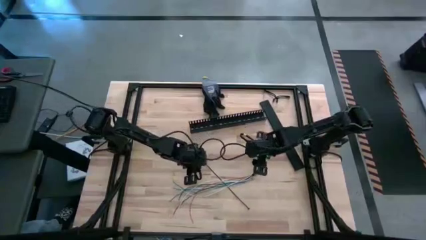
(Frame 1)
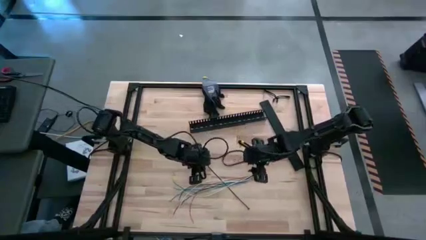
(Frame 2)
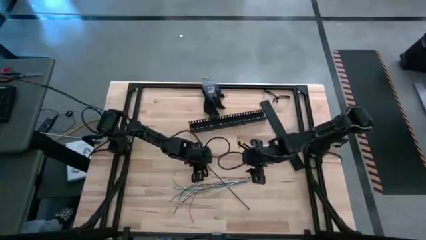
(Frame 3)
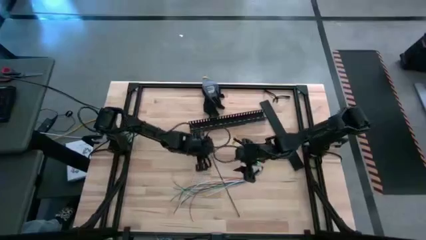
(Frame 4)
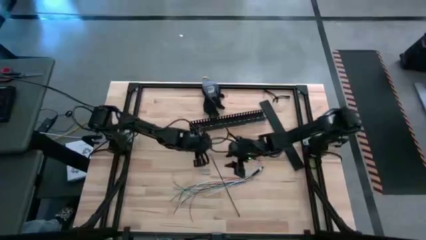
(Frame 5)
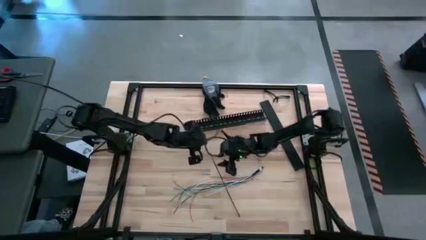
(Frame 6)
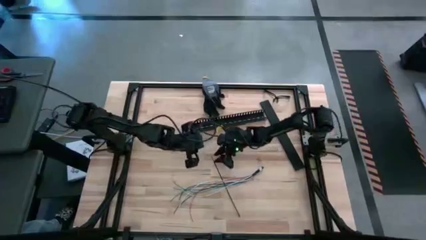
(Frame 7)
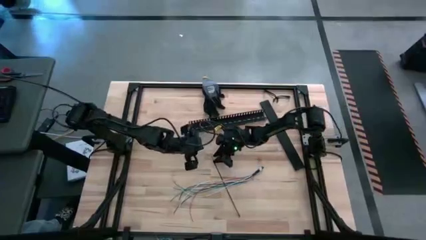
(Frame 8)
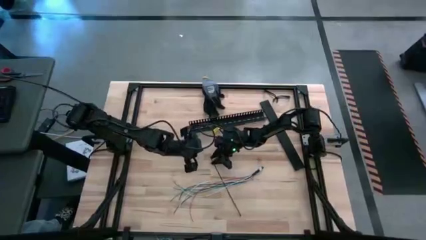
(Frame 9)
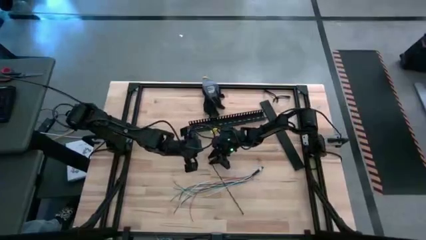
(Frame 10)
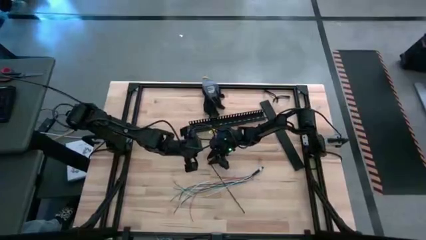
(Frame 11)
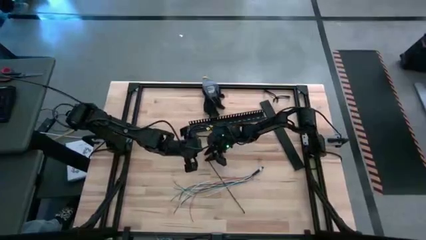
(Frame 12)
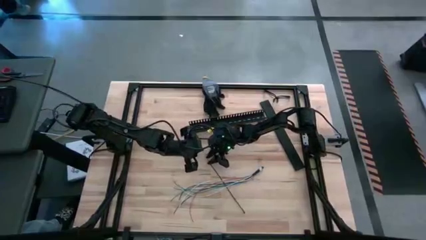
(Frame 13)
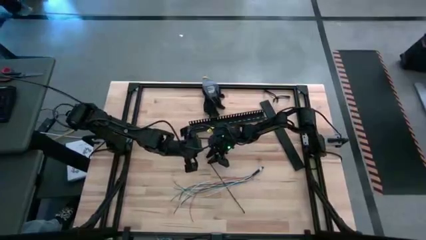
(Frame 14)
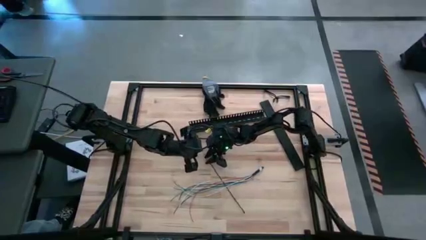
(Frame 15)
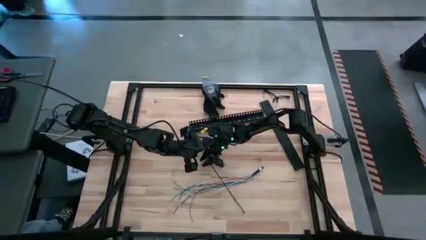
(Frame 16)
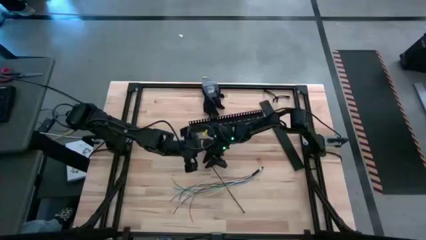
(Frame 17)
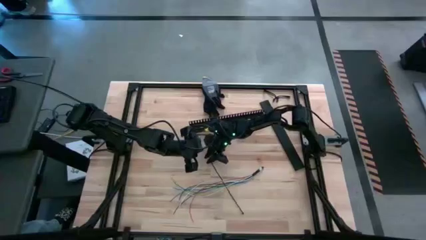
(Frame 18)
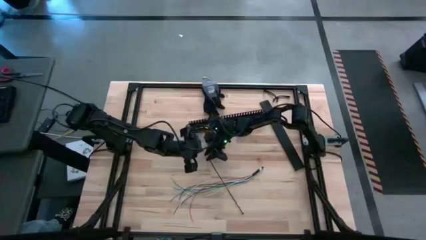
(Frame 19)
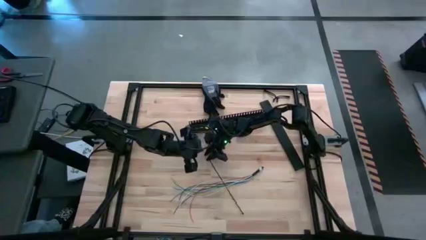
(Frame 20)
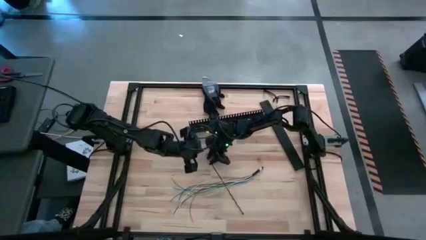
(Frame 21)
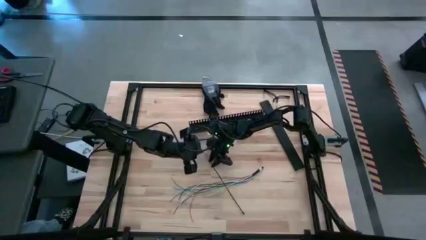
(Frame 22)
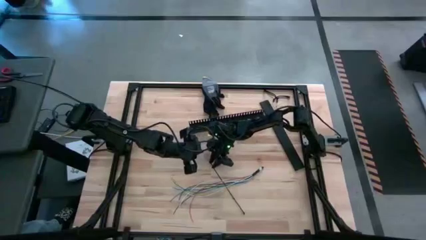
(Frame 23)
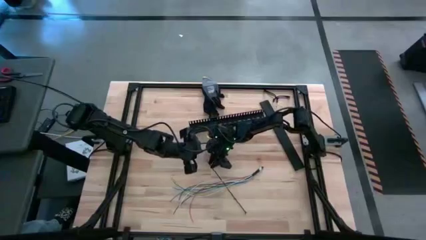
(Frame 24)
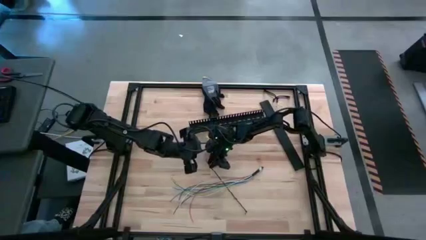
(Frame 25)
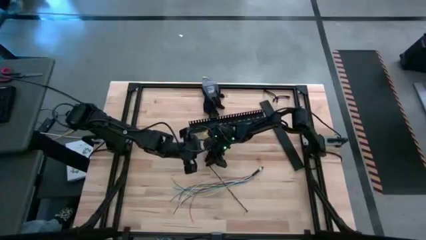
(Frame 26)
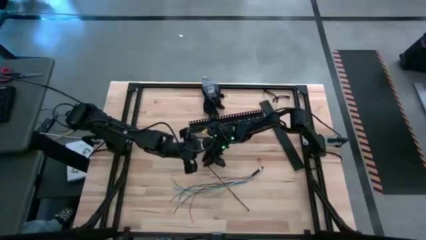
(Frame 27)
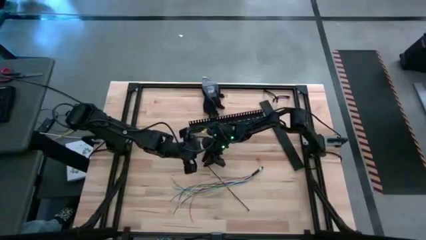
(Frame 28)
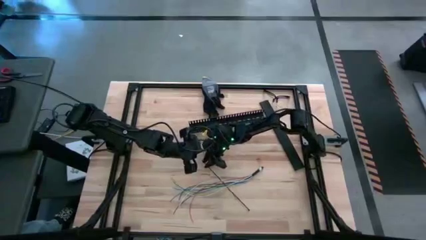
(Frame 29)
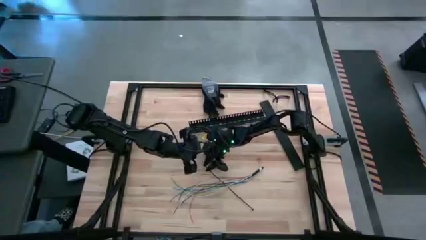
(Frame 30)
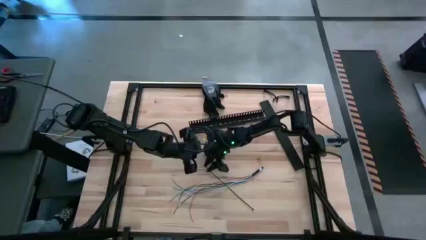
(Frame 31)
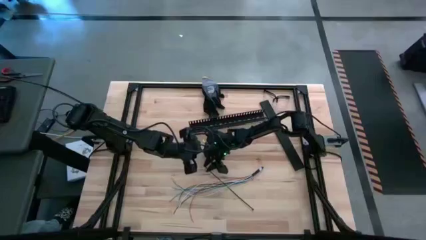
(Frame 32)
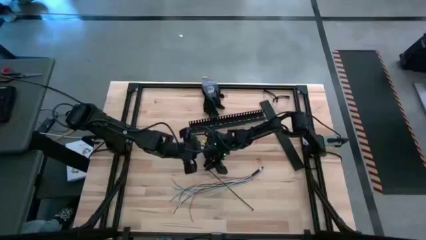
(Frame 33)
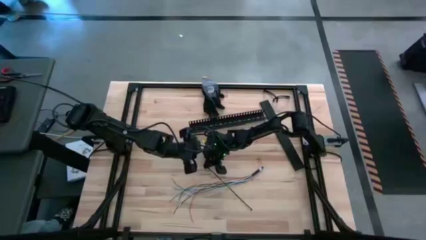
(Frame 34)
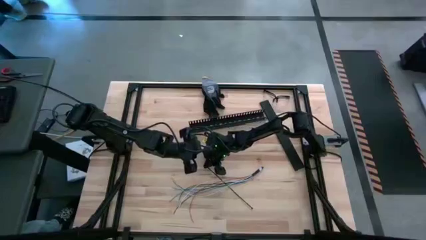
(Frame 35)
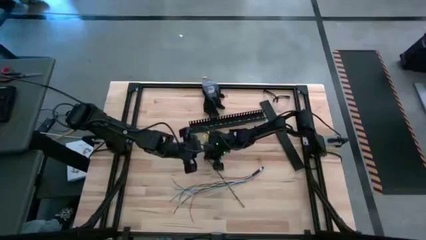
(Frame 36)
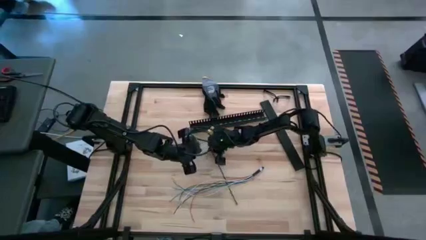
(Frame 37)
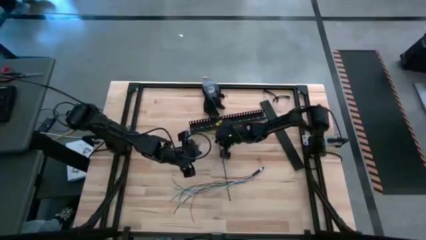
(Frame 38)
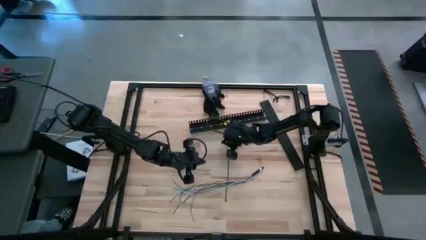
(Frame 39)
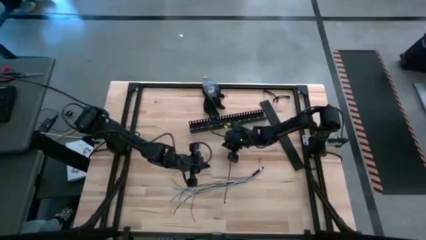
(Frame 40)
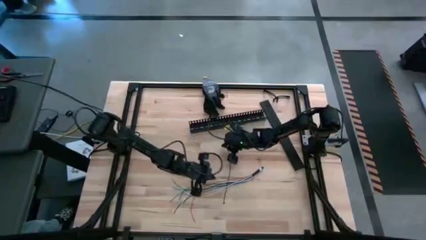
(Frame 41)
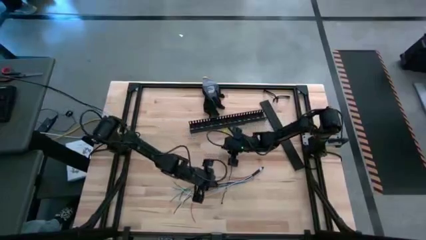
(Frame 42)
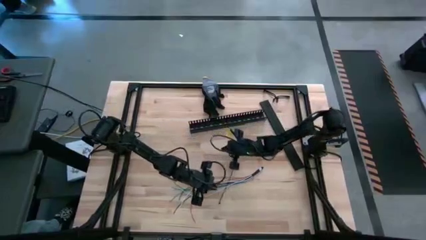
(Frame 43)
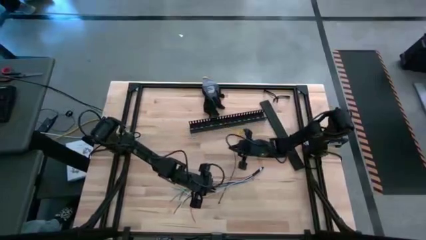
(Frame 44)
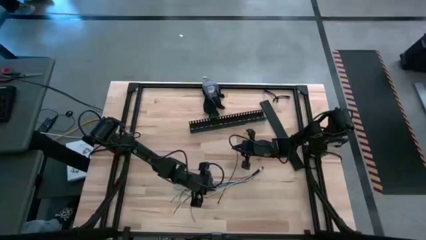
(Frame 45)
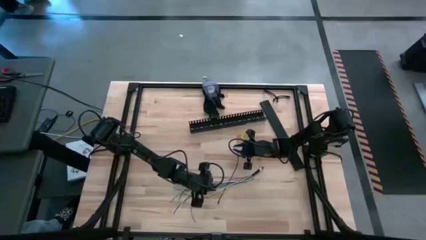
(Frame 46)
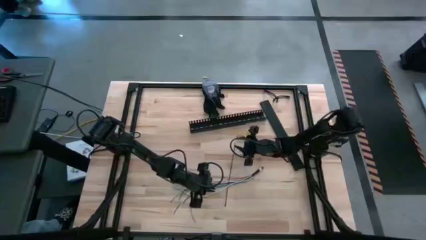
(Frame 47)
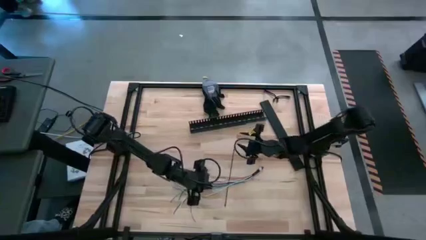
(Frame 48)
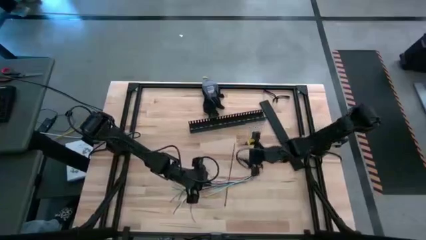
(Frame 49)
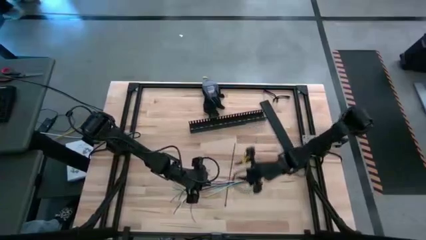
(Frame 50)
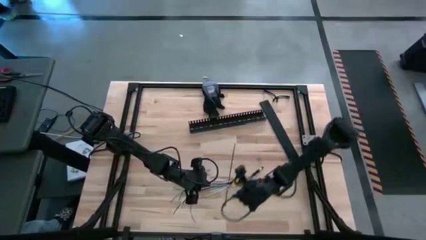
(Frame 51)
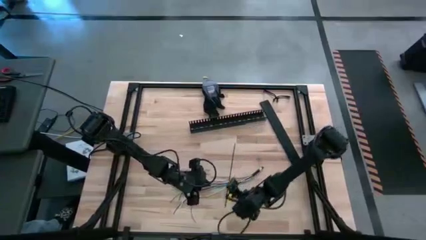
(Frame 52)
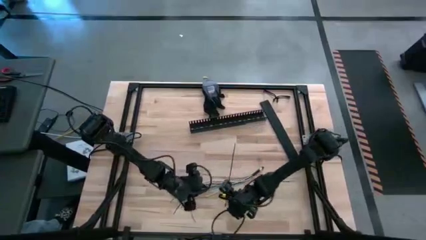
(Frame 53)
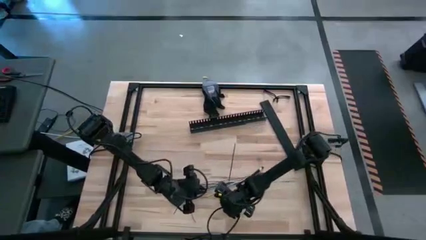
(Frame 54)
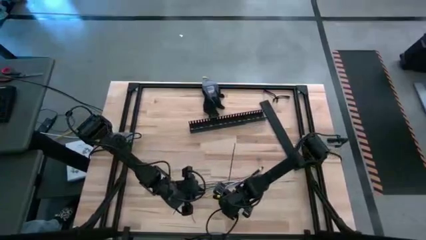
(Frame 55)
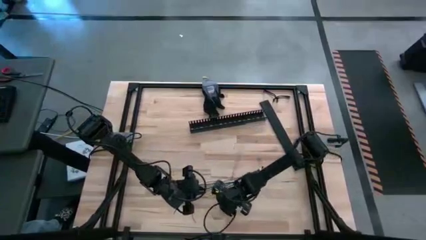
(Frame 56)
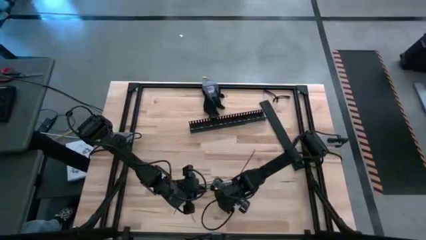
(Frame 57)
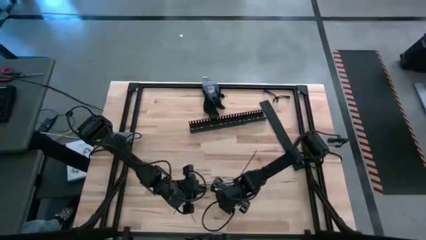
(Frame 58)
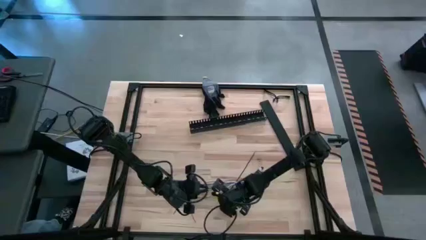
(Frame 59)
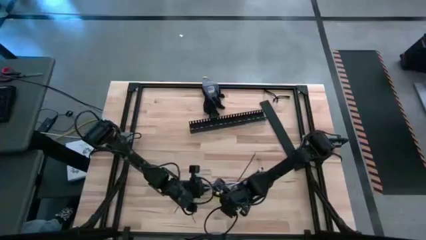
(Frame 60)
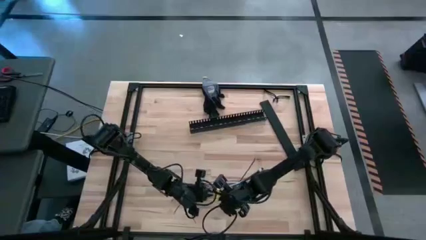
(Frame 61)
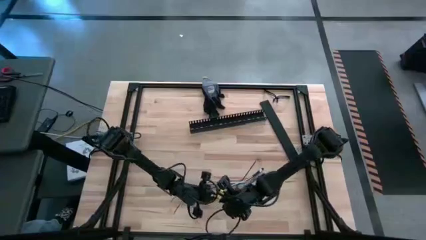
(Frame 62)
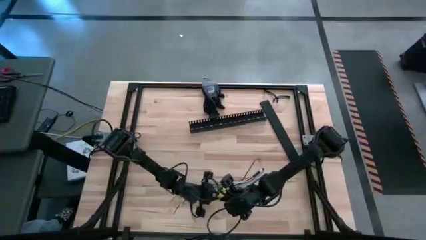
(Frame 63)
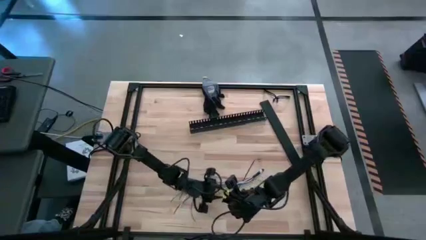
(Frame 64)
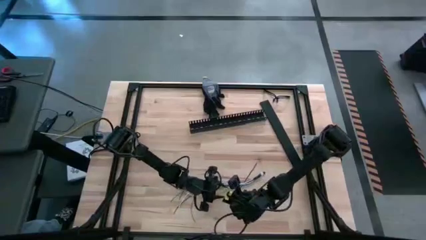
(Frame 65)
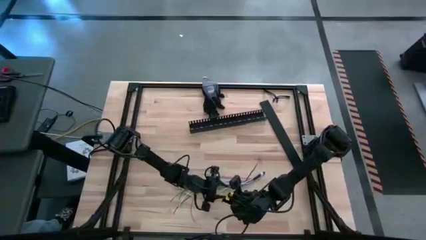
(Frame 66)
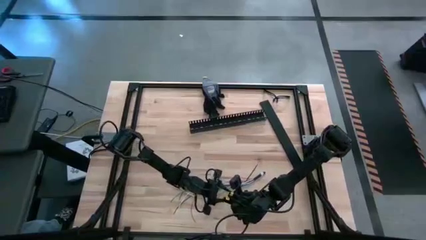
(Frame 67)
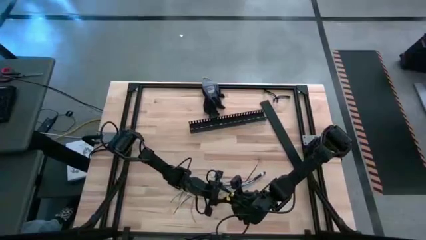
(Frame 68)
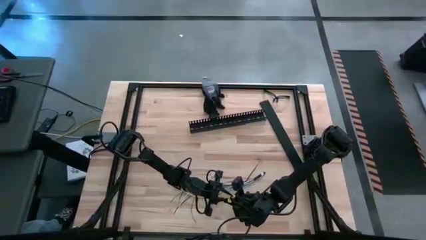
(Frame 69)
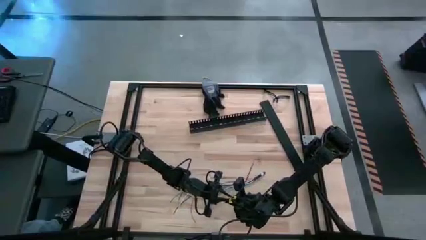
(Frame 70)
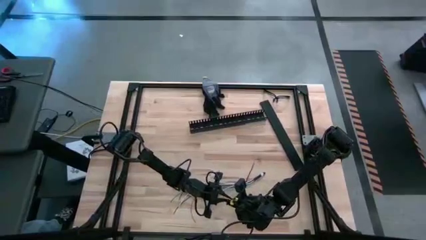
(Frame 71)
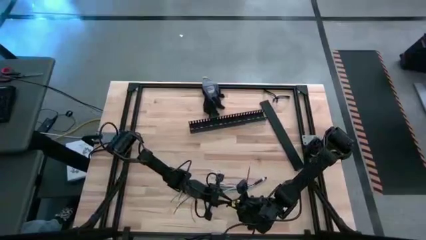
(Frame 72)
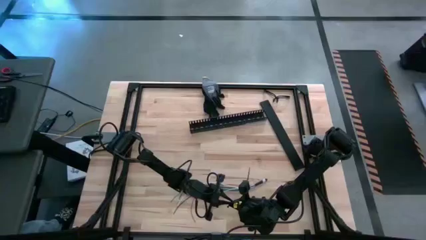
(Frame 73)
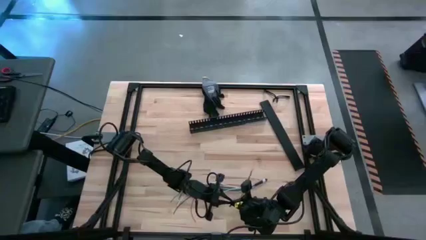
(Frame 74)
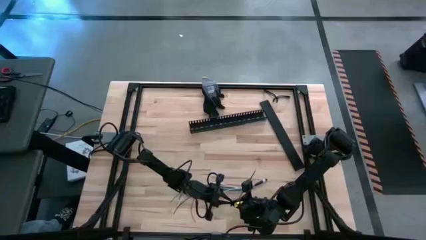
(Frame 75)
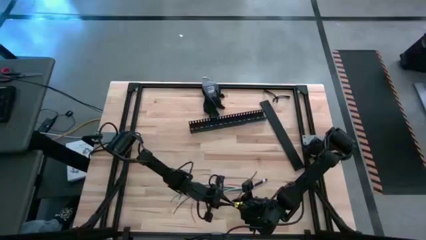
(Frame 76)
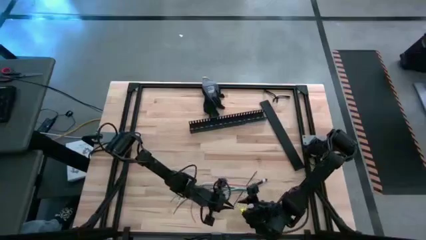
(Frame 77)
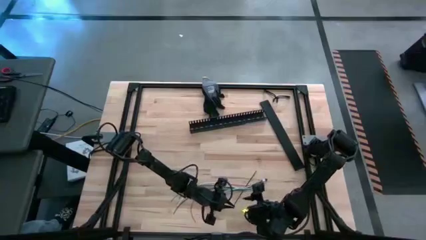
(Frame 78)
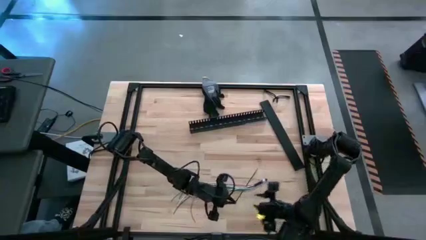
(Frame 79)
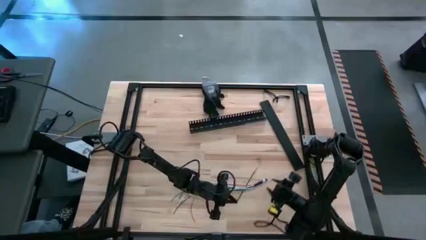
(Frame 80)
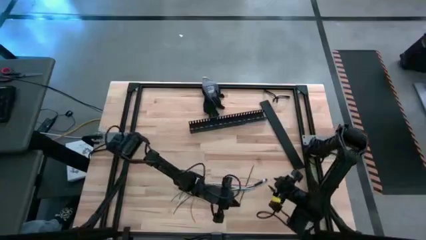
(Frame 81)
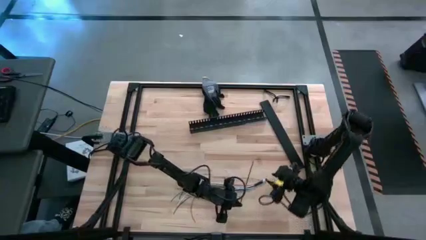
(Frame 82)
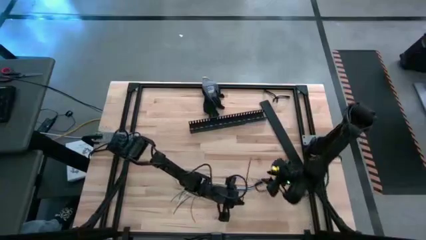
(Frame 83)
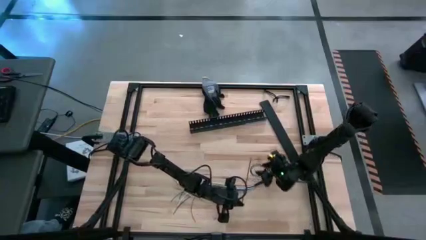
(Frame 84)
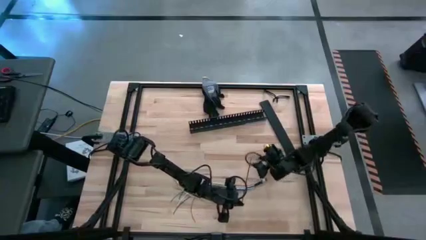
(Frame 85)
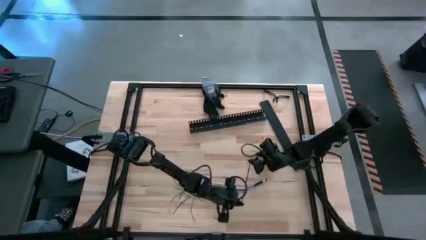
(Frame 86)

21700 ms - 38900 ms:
Task: Ziptie cables
Wrap the colored loose cables with the black zip tie
